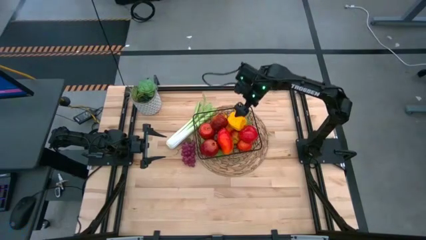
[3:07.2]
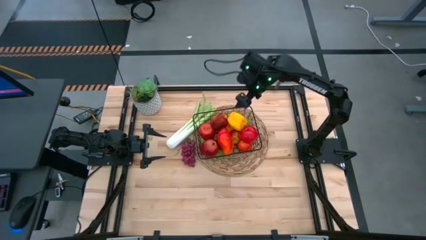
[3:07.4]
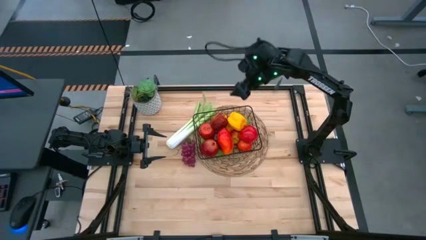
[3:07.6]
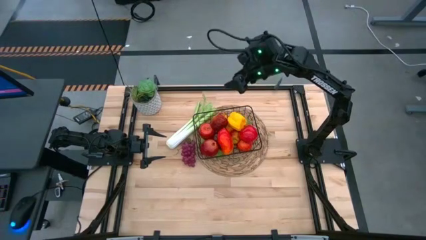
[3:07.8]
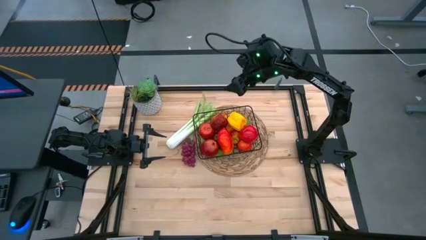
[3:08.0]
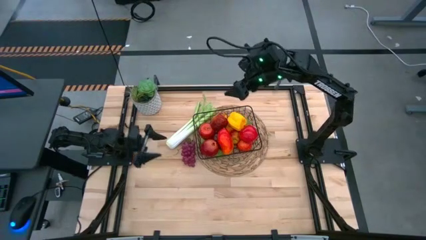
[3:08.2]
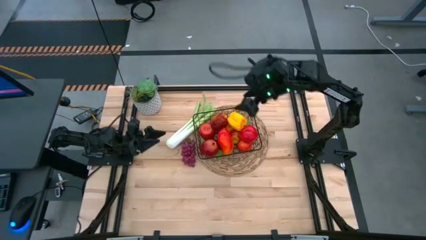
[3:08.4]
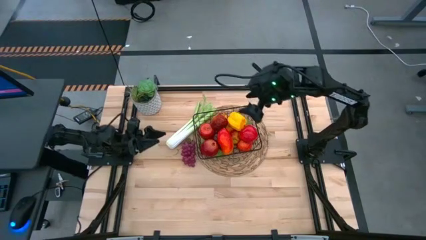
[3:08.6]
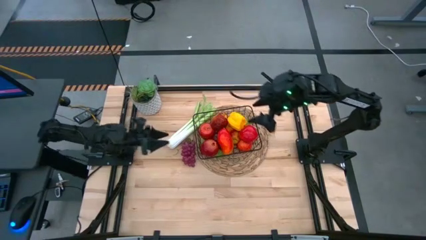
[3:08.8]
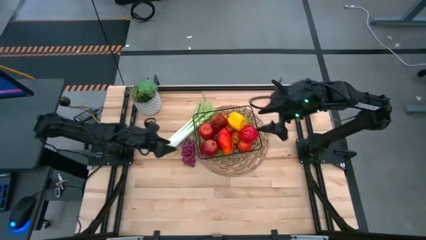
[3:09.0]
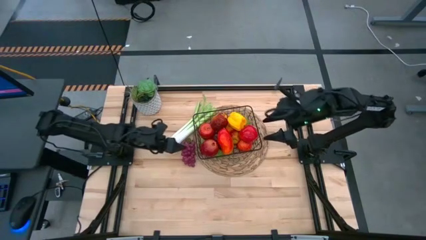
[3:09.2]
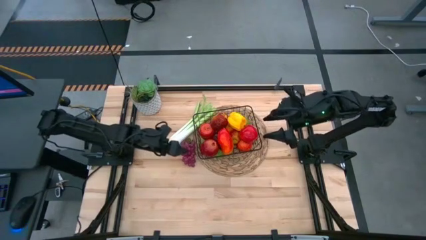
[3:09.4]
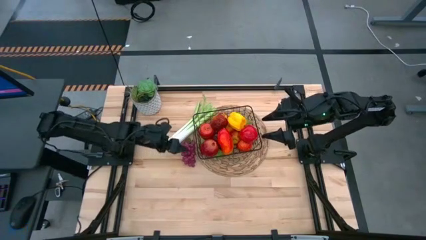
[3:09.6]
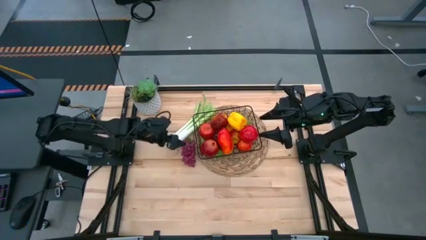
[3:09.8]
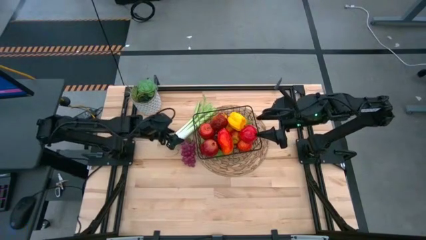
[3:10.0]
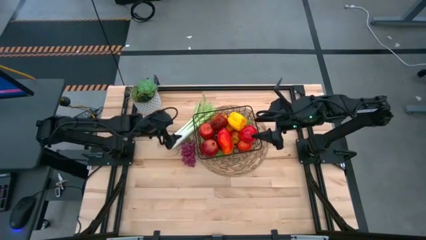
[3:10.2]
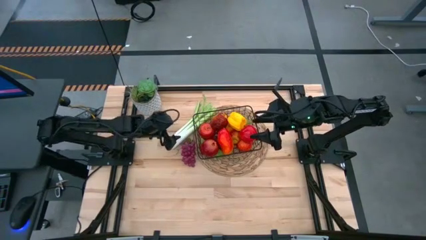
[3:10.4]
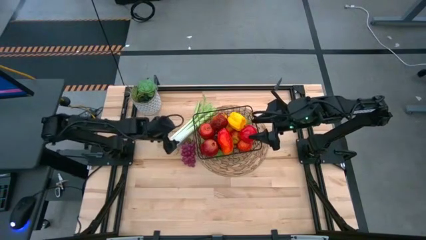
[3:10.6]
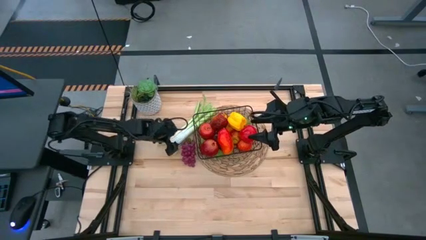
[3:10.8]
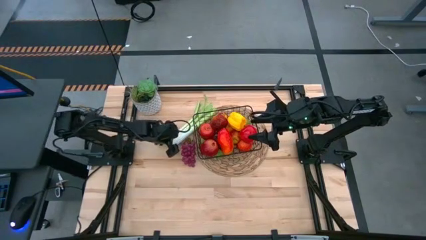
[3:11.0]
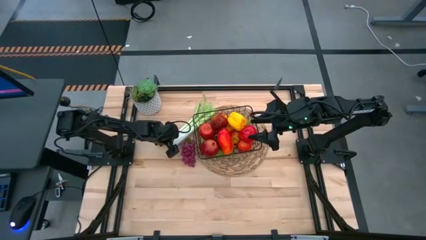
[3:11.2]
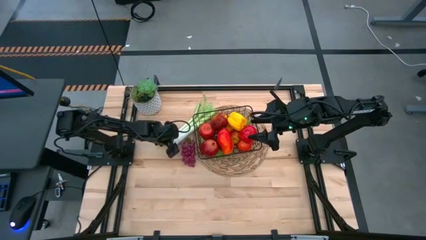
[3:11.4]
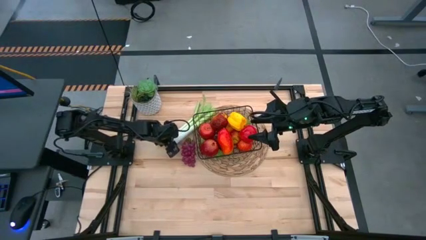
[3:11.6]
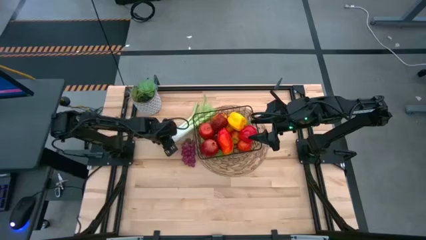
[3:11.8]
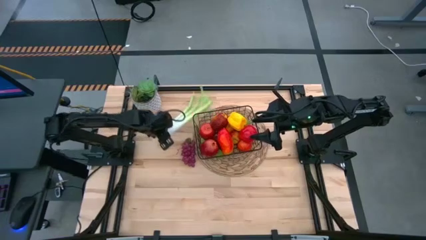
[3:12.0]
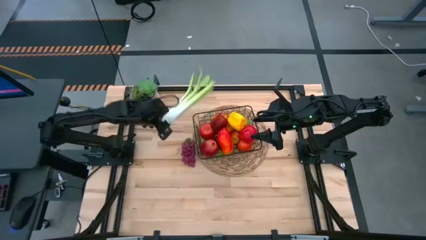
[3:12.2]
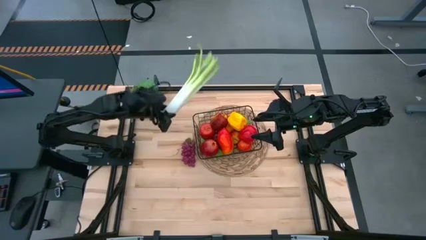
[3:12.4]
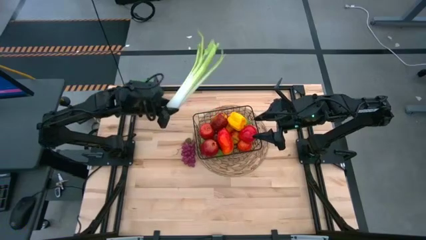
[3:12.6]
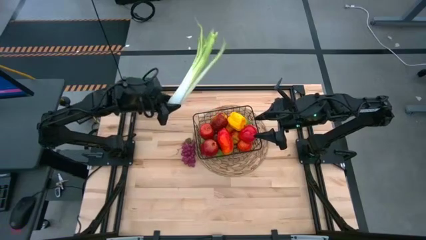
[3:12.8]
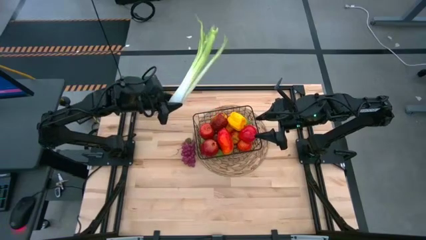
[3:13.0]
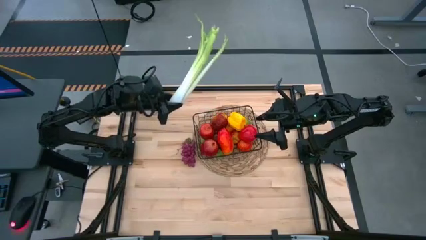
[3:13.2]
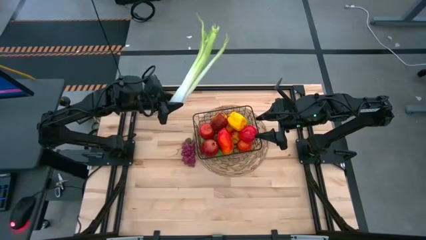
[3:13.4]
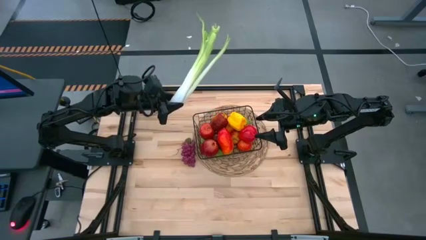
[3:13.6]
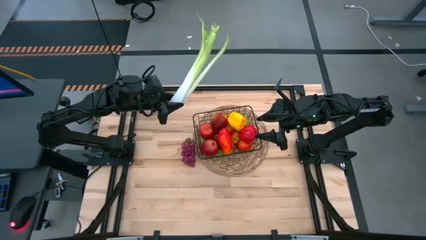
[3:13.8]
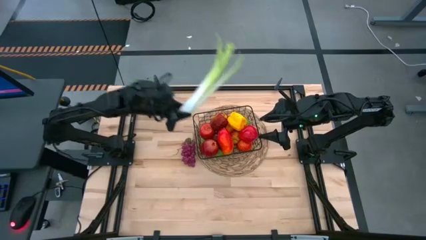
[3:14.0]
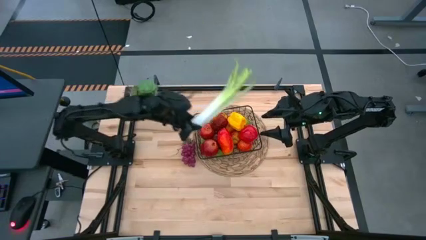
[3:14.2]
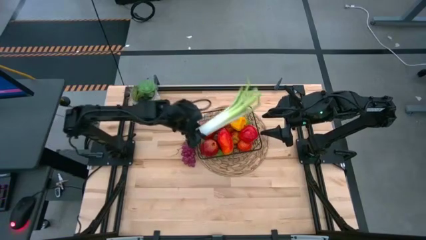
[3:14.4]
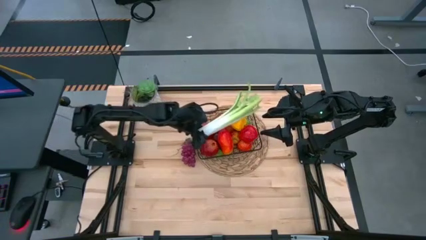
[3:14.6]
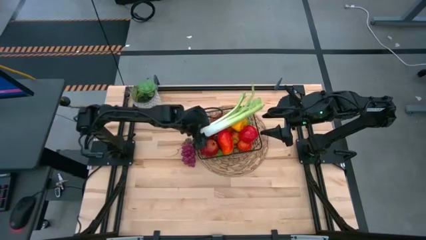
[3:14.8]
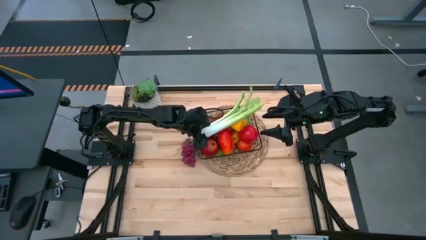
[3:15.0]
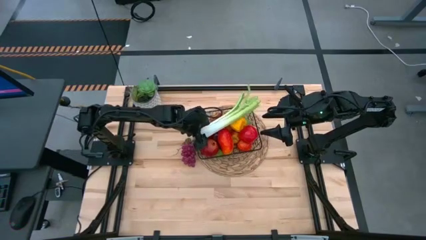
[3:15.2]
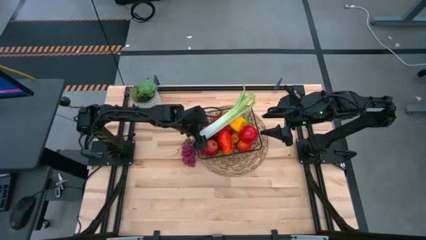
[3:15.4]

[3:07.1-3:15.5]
Task: Build produce basket
Put the green celery into the black wire basket

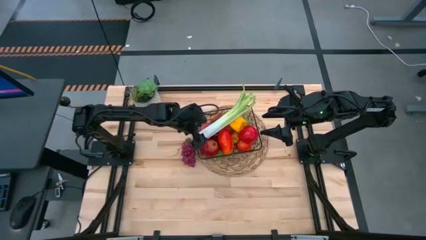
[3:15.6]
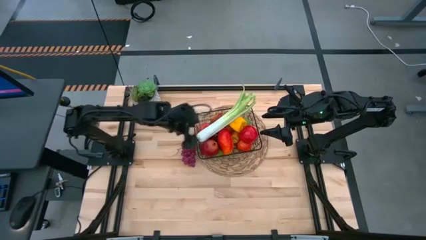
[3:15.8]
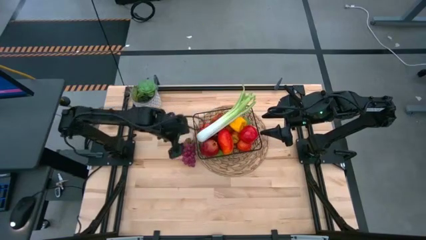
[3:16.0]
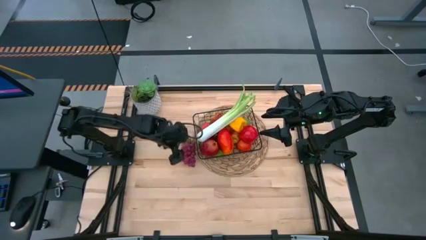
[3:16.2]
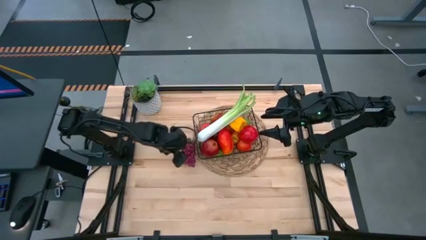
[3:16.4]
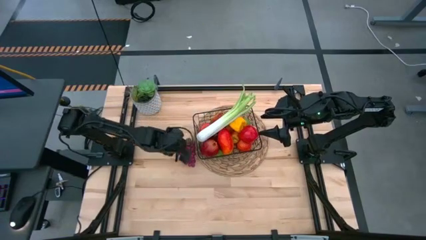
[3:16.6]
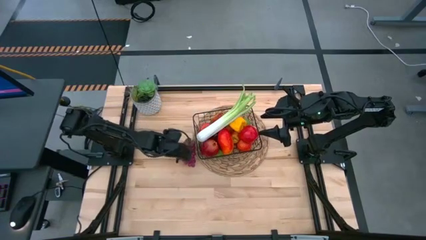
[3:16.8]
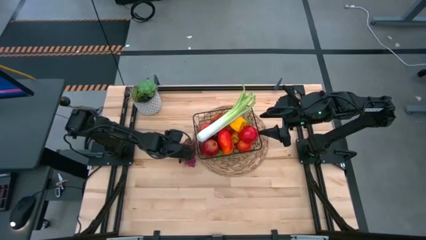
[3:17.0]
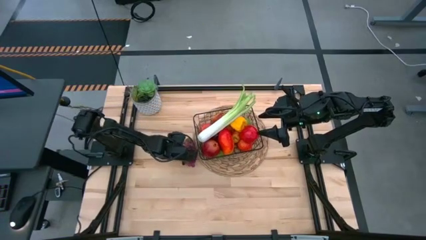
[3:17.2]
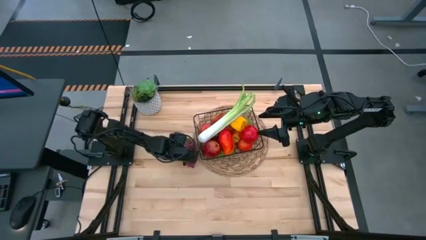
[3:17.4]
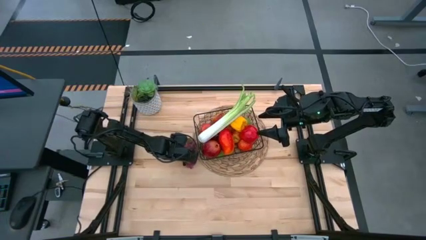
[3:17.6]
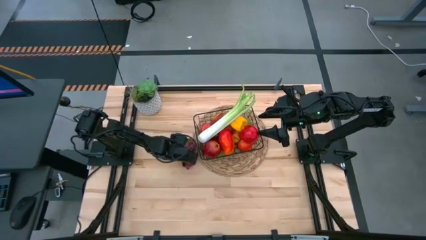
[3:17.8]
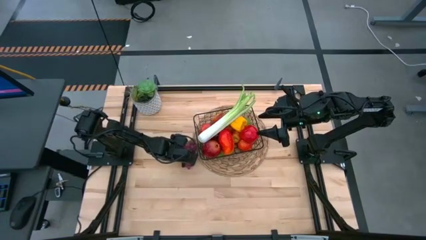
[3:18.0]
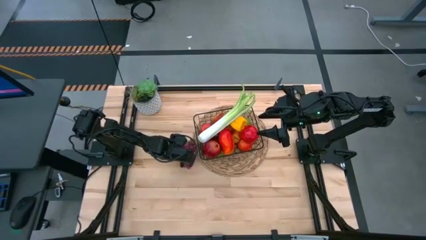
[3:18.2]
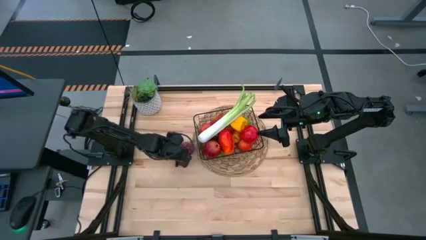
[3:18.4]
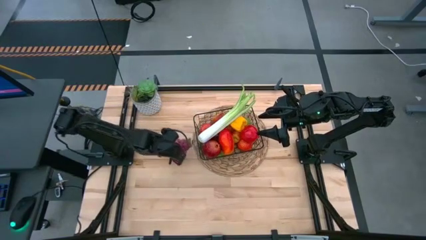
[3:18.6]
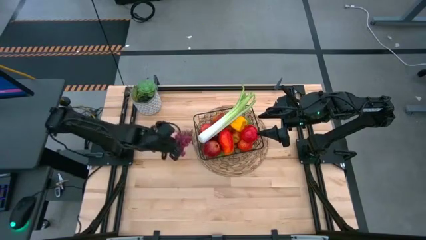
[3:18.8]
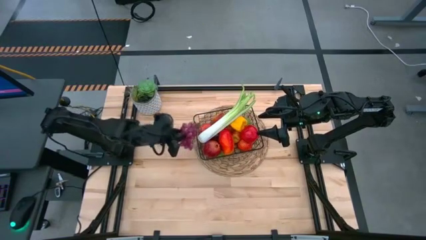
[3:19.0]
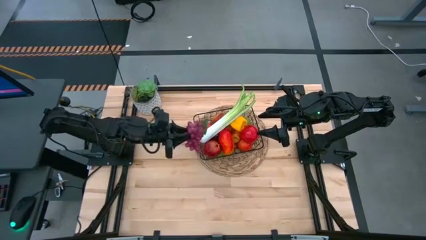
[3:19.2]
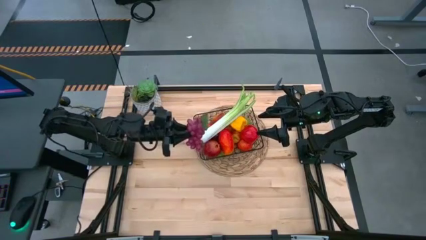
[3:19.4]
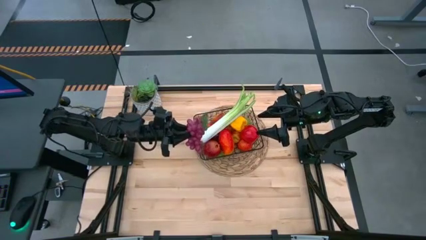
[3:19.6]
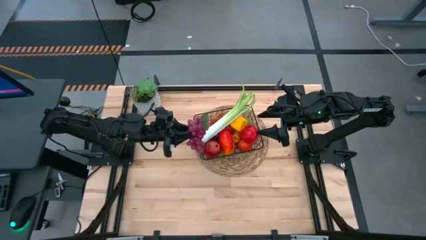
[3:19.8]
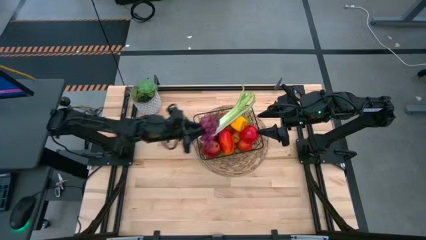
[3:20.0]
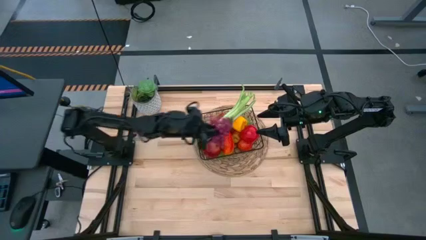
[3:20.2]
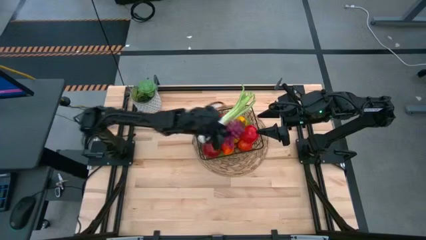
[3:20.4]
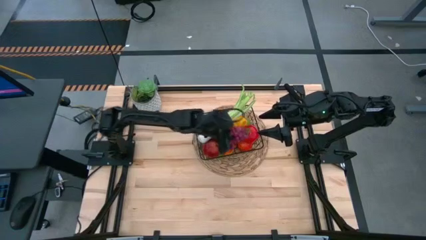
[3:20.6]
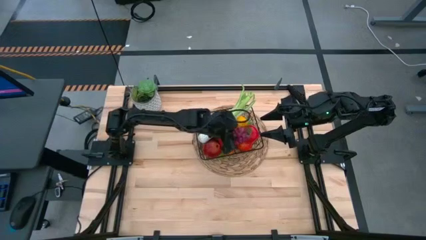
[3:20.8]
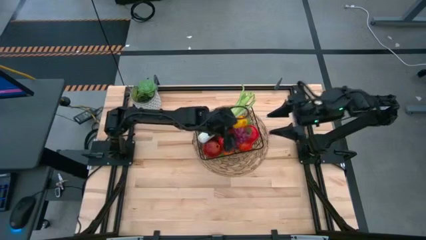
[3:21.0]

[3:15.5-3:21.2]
Put the violet grapes into the black wire basket

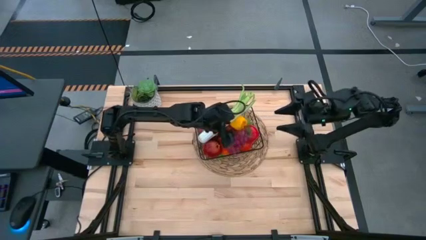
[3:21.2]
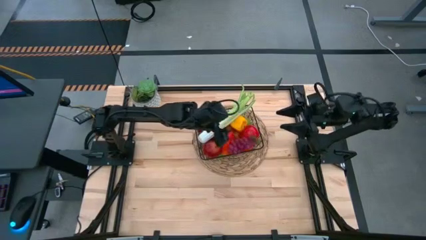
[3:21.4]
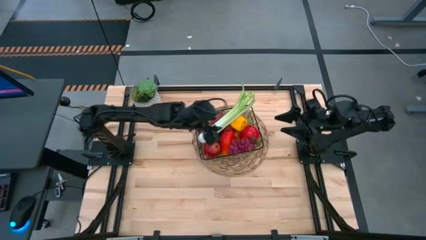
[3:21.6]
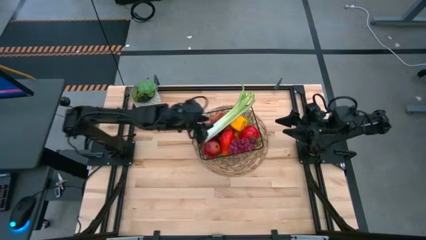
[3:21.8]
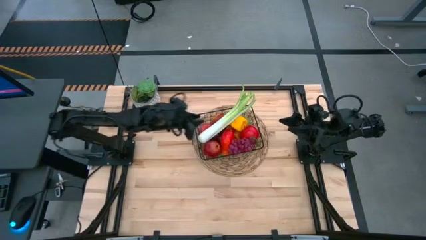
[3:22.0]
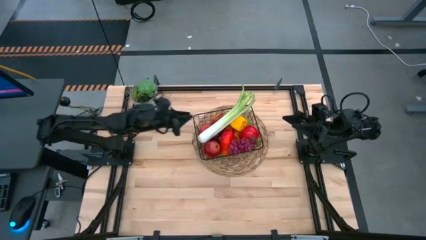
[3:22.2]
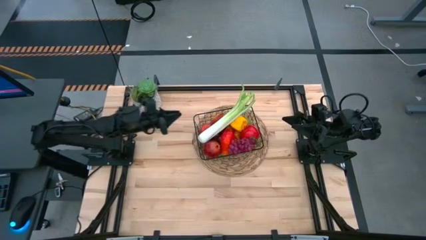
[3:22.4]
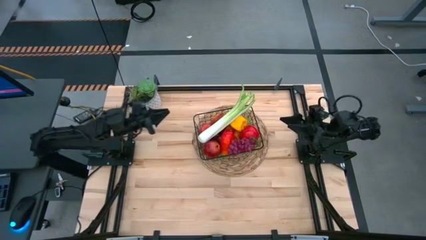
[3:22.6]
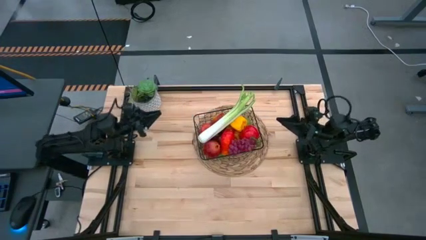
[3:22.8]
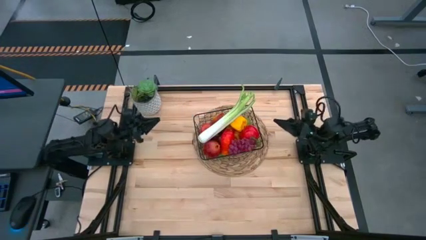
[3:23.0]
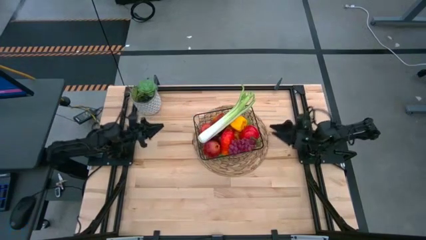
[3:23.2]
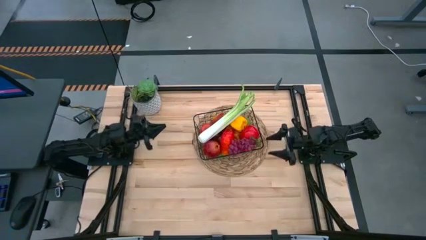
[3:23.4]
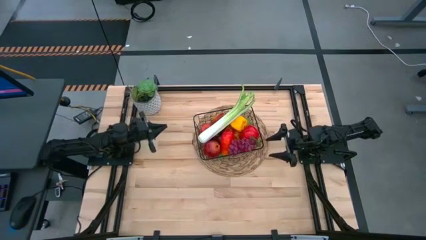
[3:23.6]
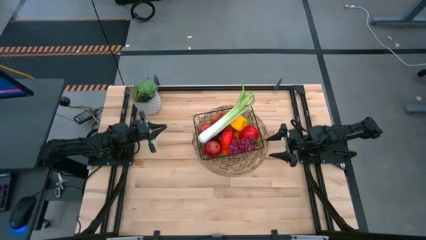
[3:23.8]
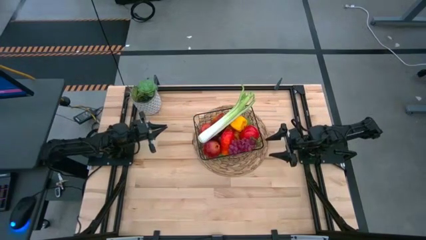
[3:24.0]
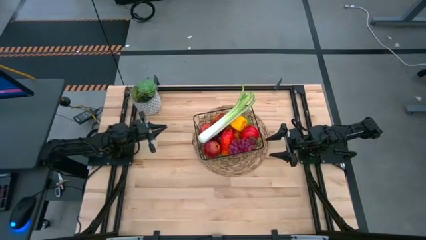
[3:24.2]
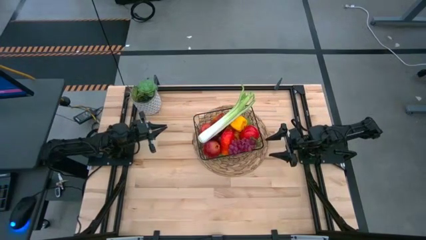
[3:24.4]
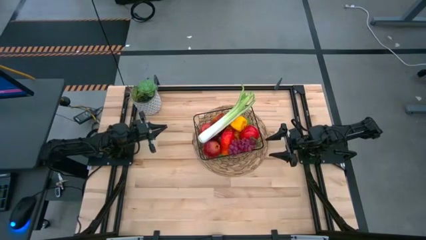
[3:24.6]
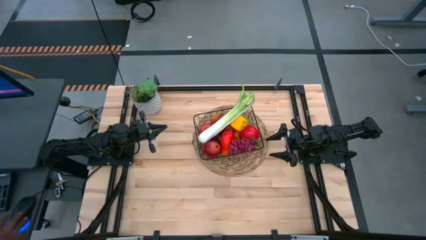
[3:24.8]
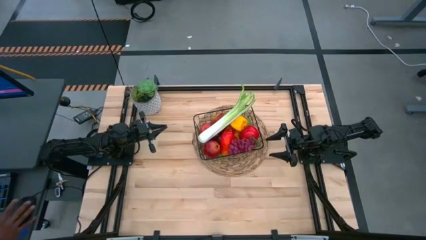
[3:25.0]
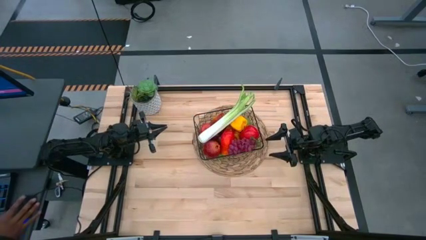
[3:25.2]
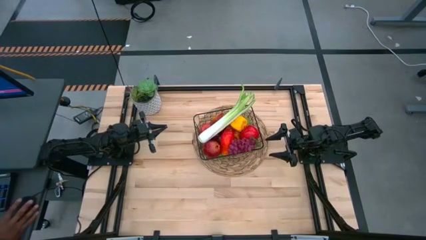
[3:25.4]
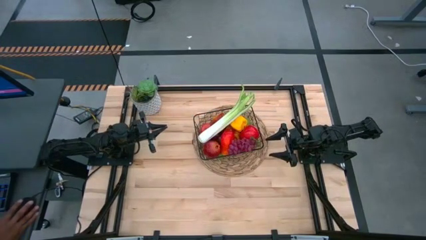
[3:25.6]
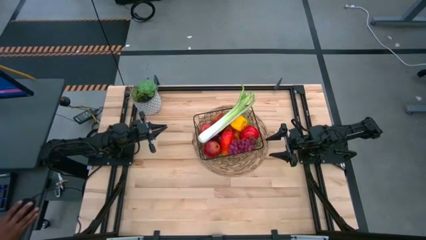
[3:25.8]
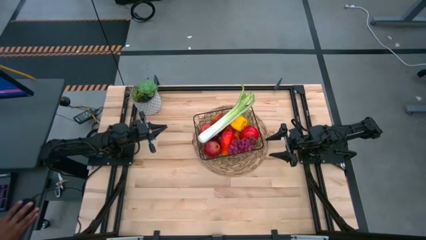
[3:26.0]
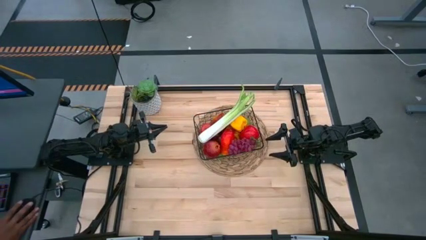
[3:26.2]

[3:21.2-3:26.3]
Return to Home Position
